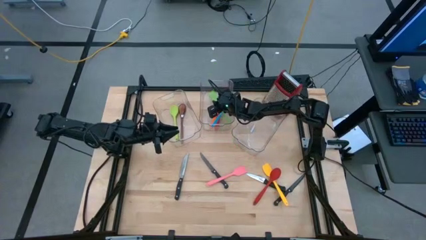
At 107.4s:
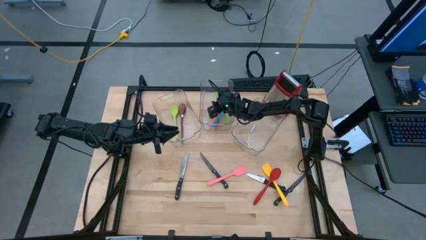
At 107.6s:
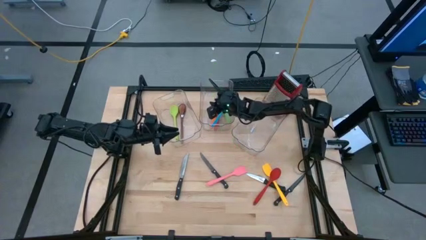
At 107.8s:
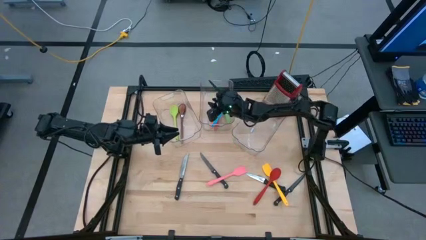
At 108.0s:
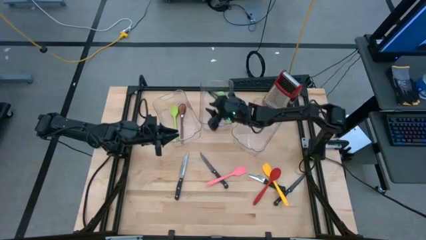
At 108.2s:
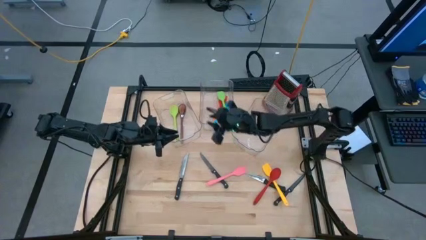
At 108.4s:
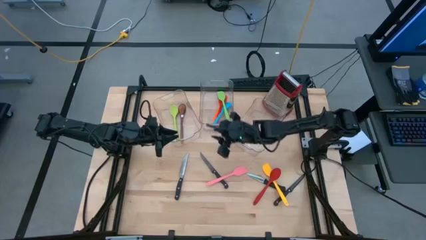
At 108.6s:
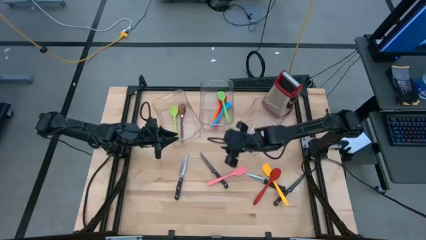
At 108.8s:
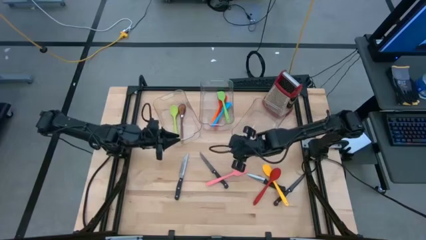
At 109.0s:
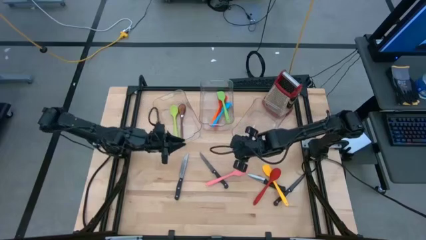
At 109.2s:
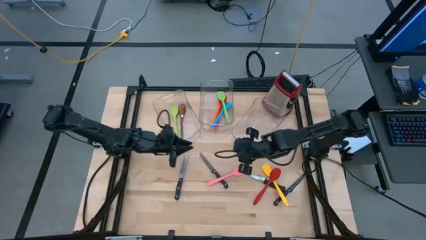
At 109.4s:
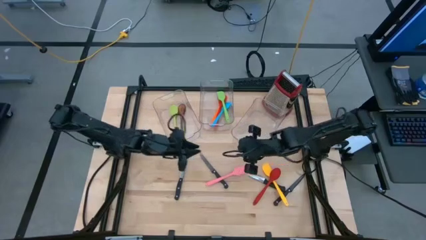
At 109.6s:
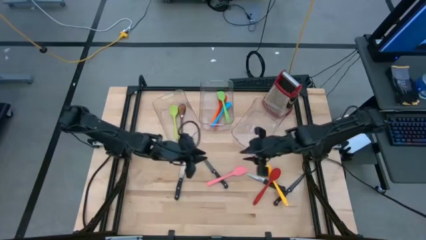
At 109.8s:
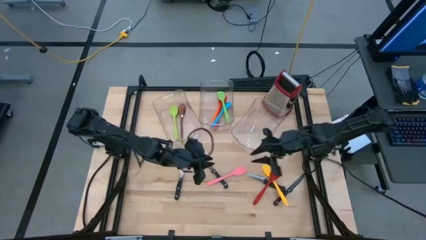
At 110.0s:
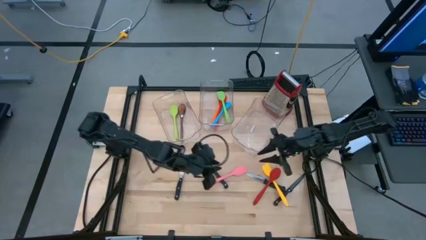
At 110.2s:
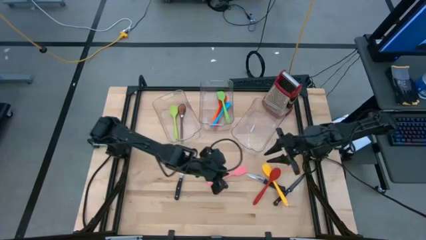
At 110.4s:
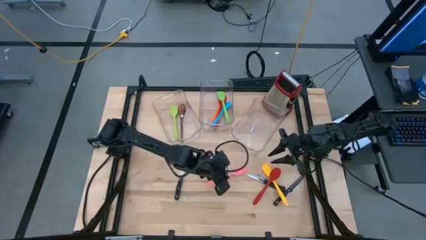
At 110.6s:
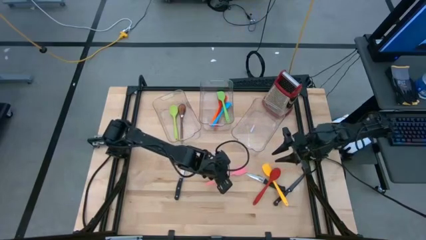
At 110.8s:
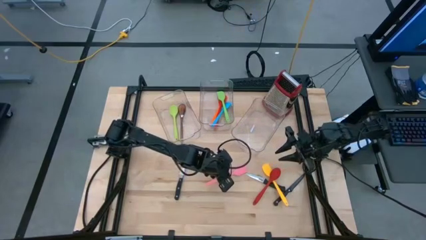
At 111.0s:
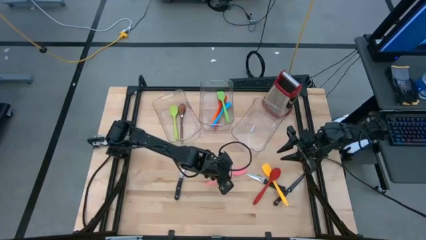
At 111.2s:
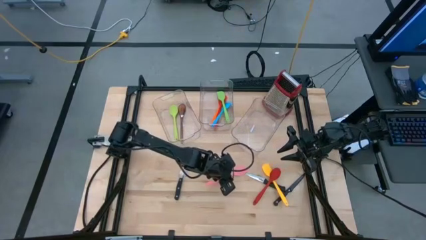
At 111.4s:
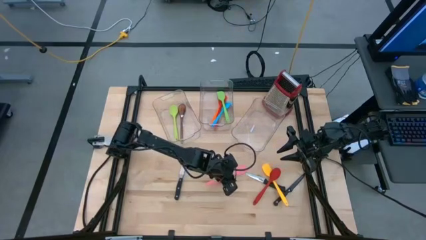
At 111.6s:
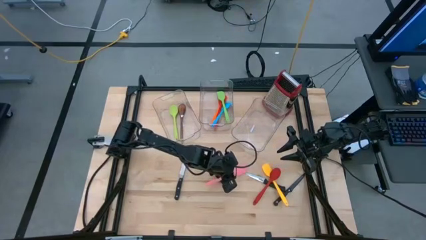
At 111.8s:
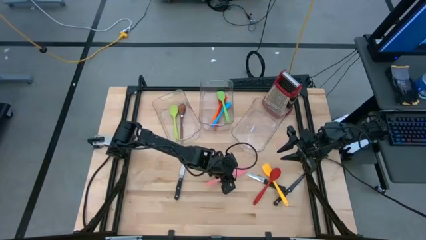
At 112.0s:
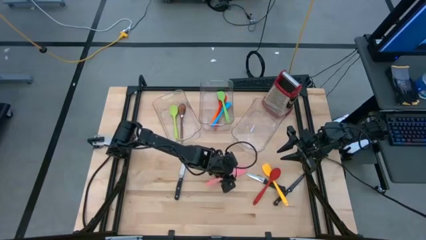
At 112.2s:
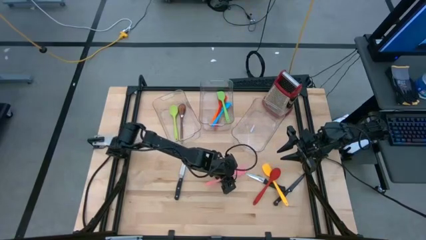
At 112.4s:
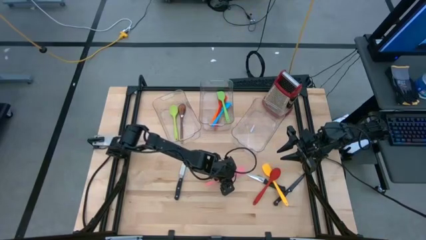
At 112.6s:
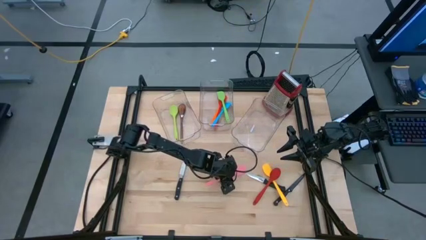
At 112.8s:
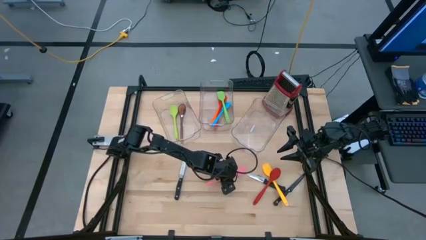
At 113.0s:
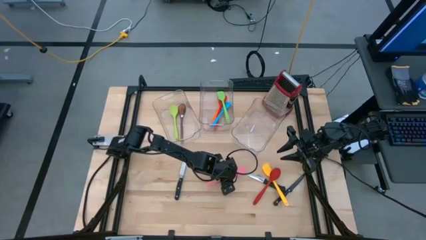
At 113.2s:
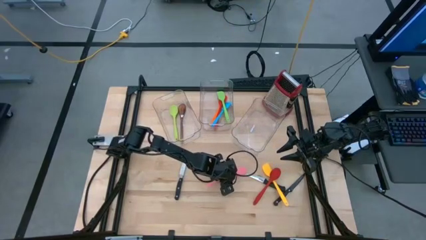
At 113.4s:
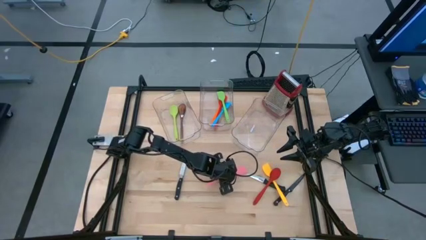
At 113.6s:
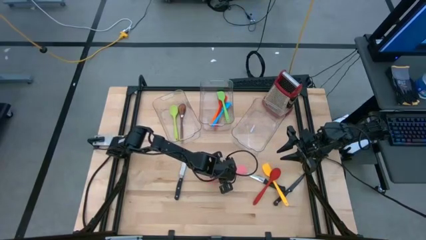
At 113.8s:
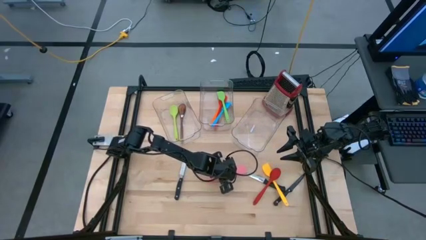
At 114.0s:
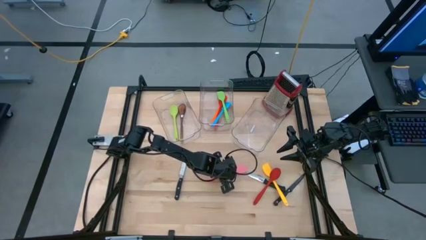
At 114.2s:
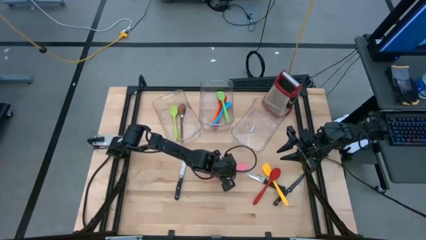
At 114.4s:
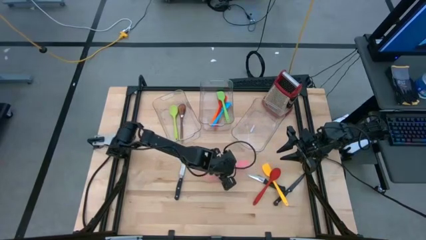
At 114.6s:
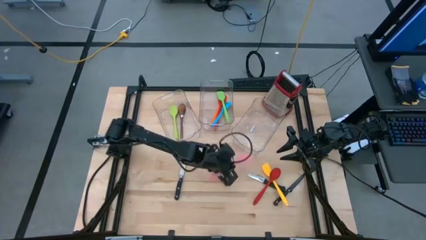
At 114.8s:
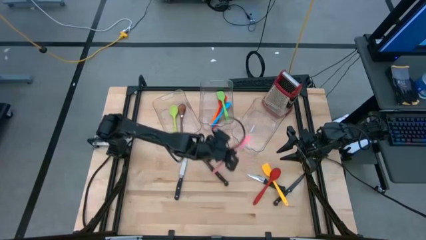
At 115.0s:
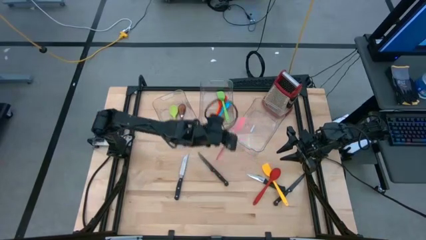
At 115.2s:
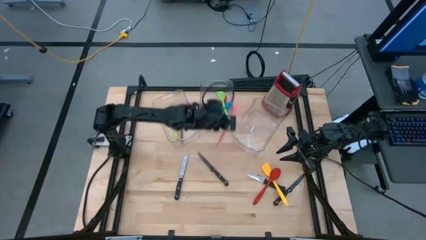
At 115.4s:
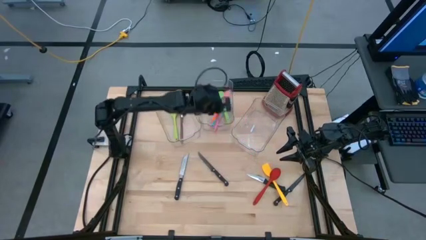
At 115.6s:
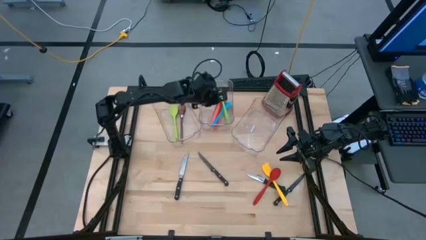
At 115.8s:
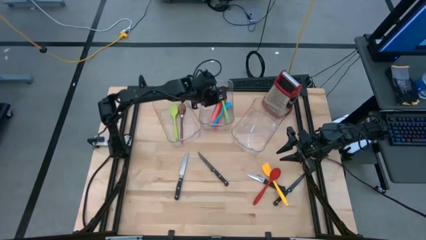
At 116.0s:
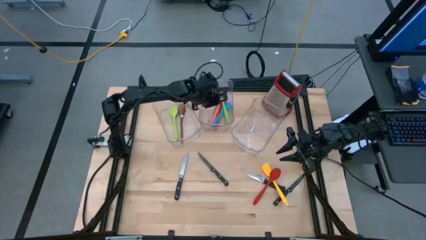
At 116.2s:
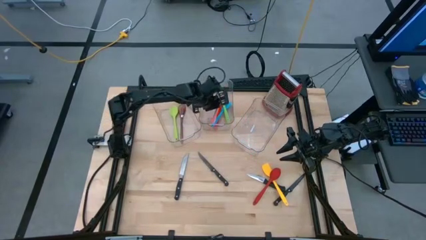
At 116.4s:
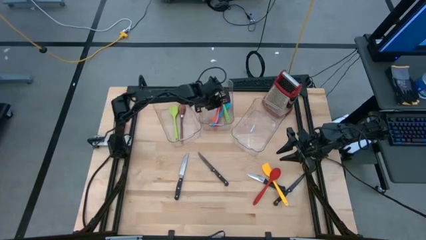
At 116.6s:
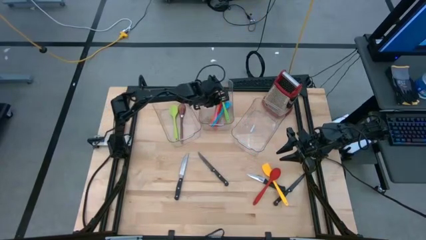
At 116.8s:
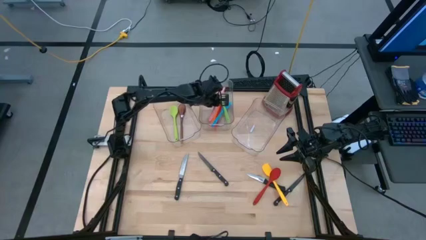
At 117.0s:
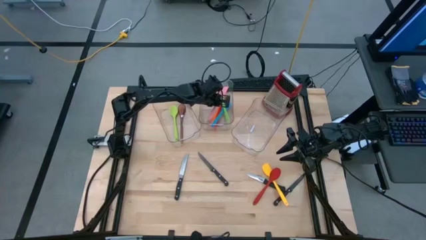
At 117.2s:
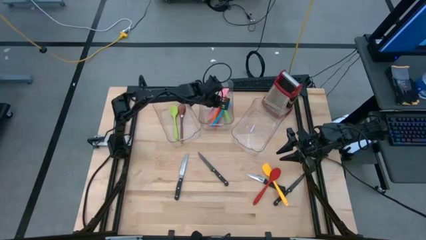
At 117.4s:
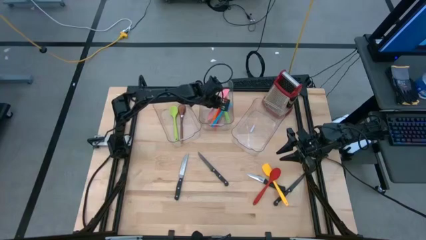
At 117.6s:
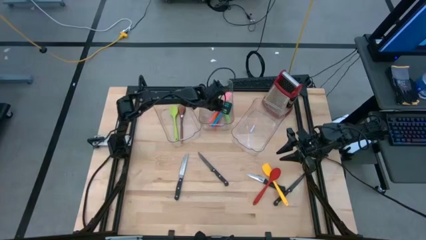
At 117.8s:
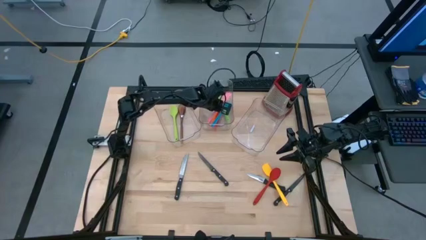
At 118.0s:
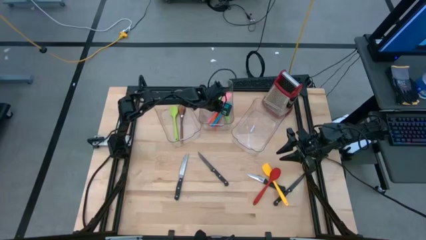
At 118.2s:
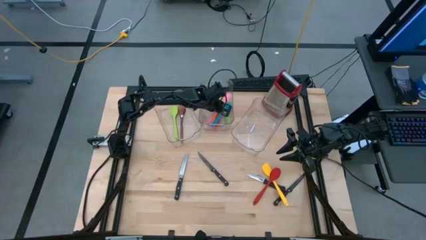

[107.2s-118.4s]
Task: Pick & Place Kitchen Items
Put the pink spatula in the middle bin

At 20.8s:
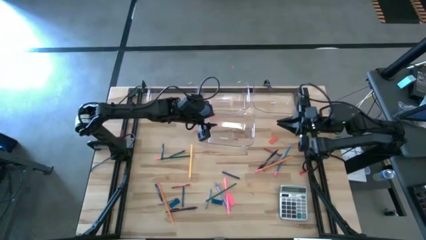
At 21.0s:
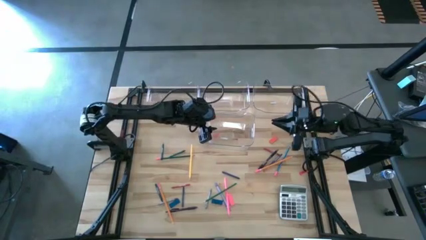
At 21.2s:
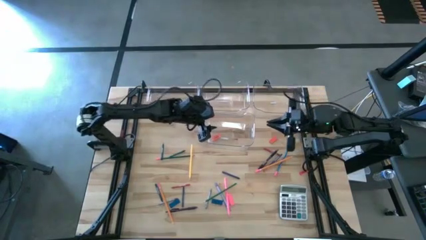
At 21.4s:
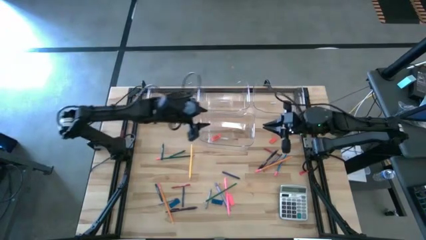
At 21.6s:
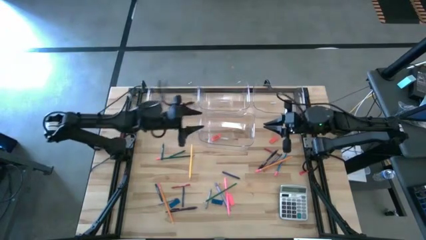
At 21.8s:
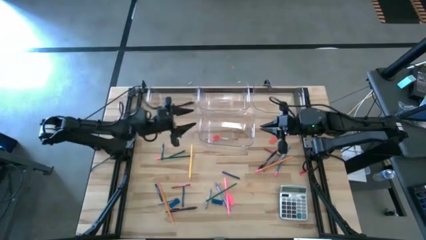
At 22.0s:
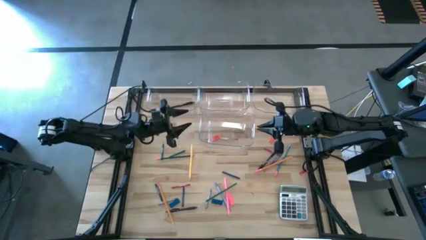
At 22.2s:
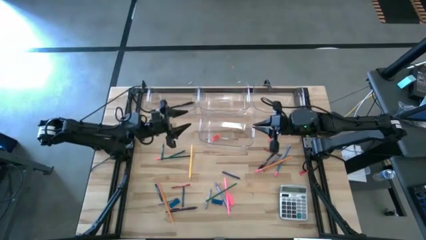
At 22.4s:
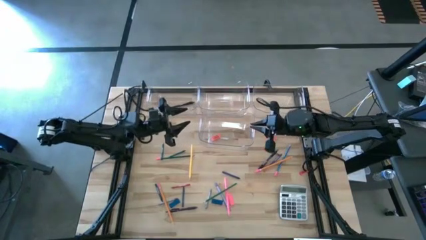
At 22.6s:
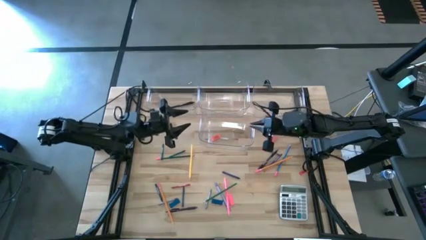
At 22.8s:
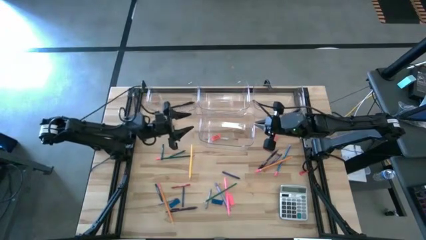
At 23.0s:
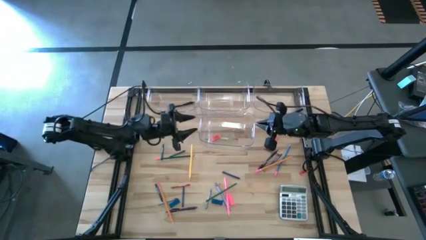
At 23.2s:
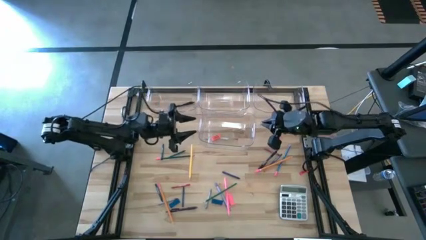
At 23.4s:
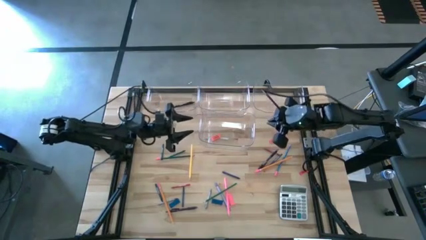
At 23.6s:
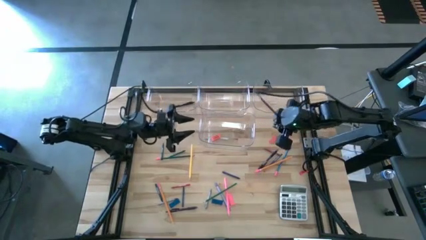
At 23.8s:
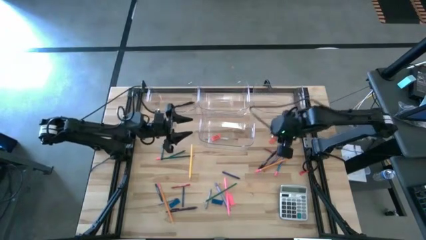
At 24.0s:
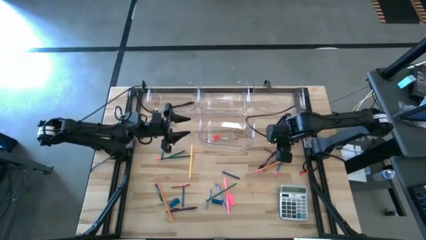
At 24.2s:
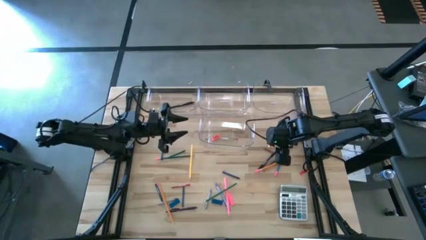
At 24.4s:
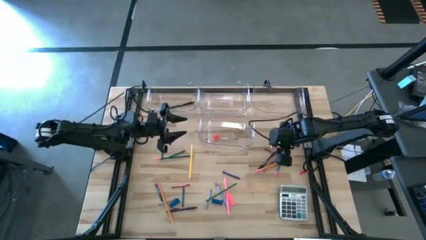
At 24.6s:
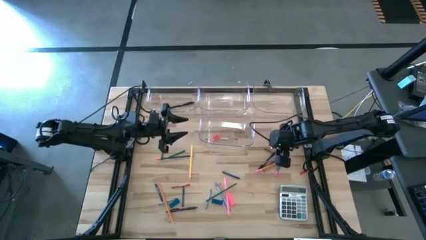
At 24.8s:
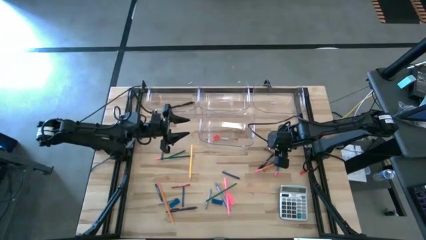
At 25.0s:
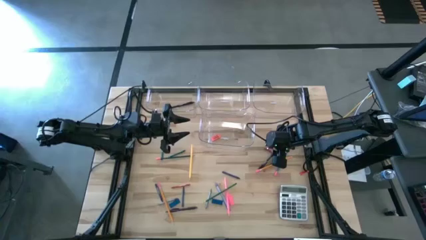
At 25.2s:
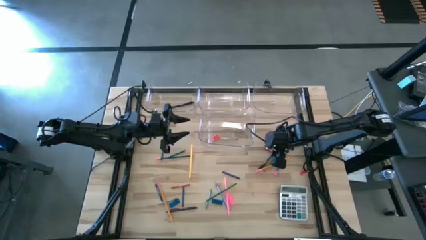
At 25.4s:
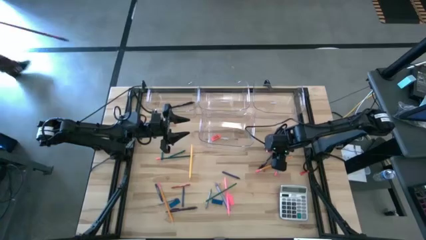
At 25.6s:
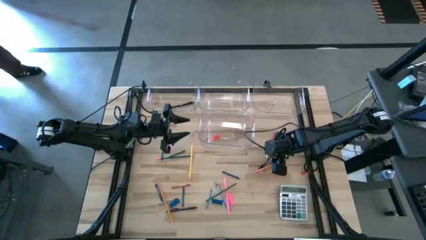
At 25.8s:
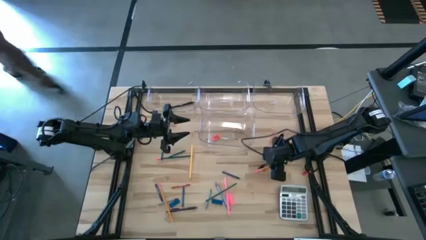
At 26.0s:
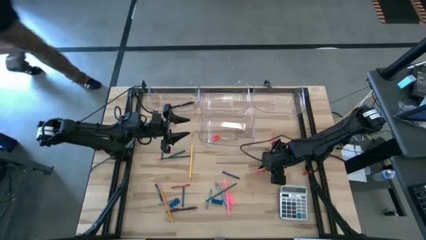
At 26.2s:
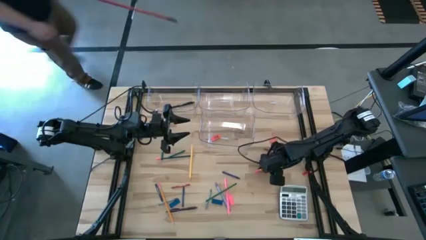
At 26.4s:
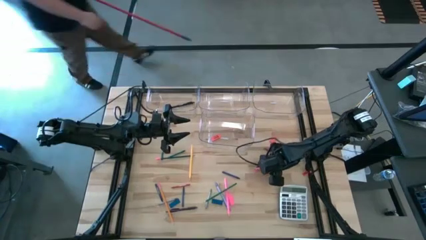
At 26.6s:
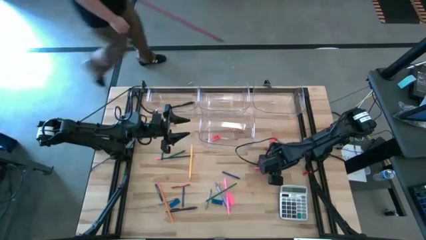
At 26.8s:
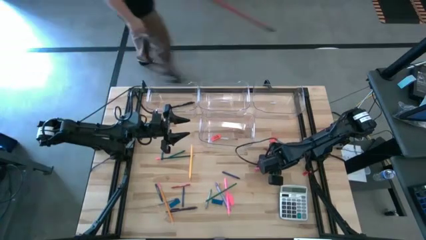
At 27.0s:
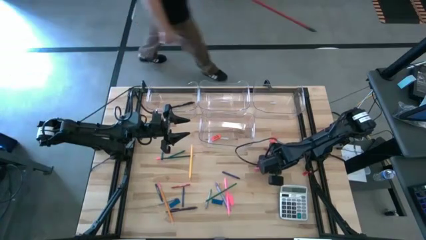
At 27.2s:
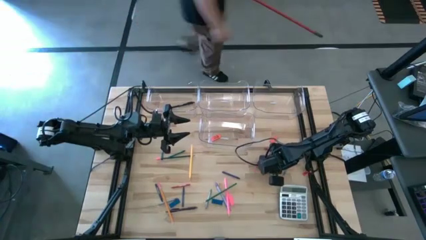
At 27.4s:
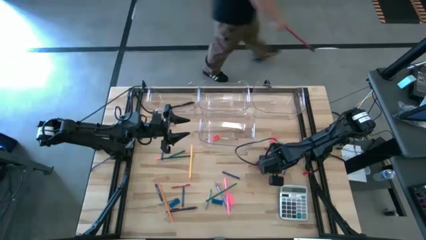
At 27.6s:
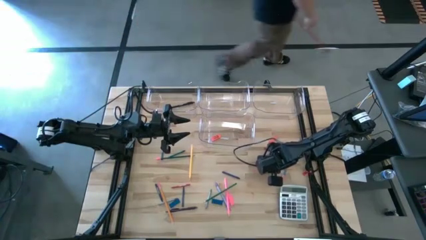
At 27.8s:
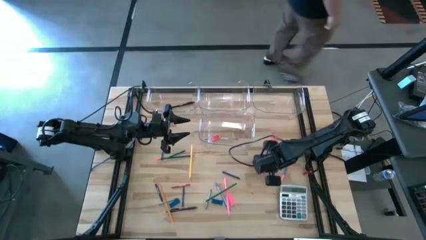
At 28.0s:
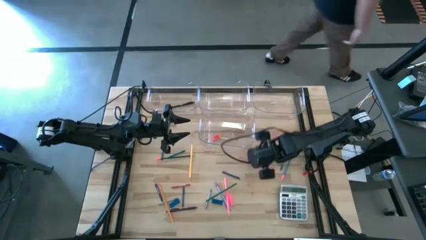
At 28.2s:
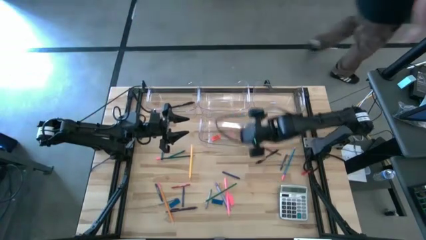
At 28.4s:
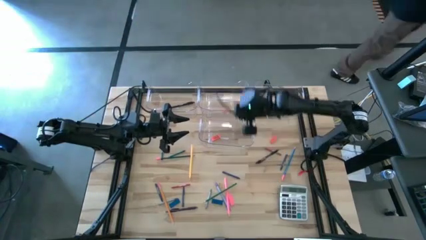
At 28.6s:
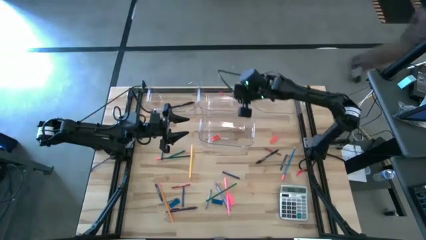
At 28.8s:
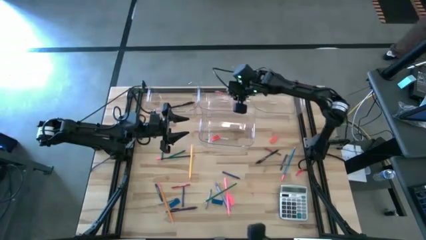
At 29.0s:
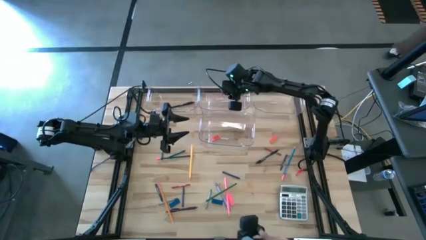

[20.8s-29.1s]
Task: Sort crayons/erasers/pens/pencils in bins
Put the orange pencil into the top center transparent bin
